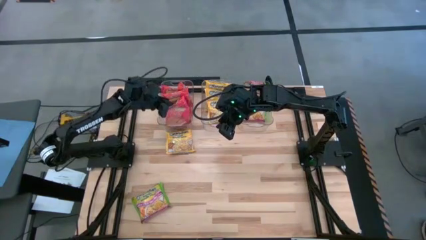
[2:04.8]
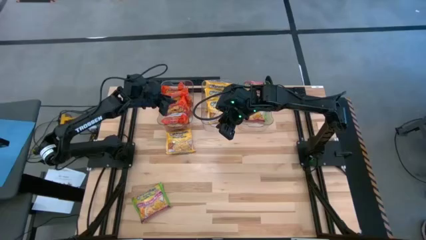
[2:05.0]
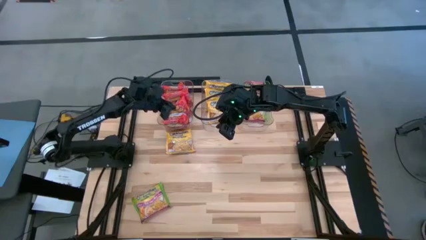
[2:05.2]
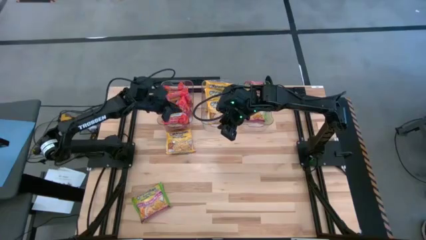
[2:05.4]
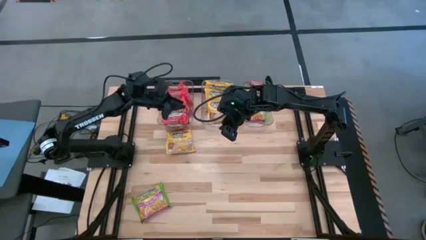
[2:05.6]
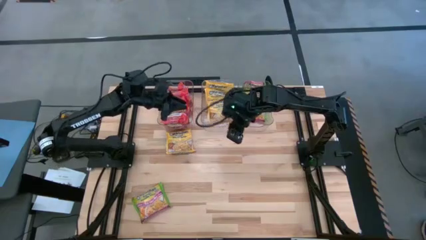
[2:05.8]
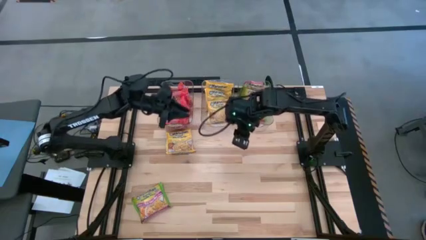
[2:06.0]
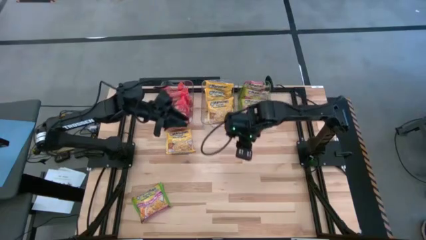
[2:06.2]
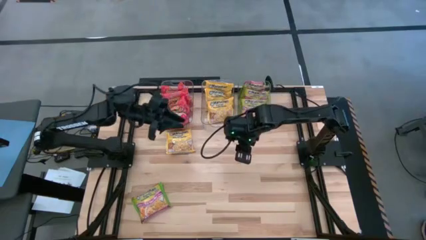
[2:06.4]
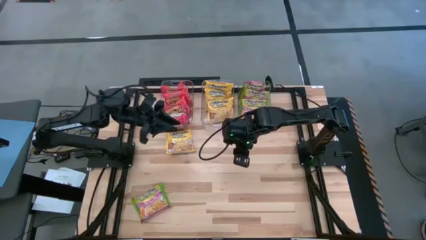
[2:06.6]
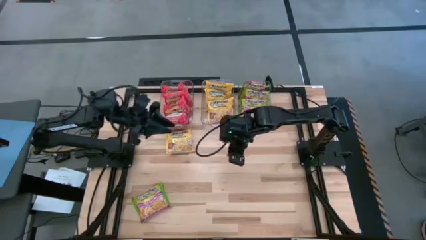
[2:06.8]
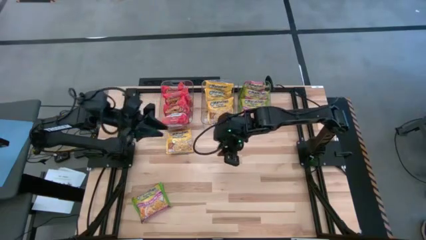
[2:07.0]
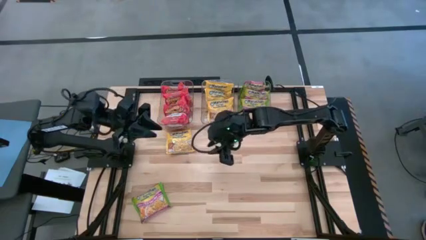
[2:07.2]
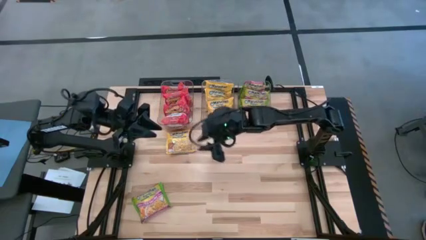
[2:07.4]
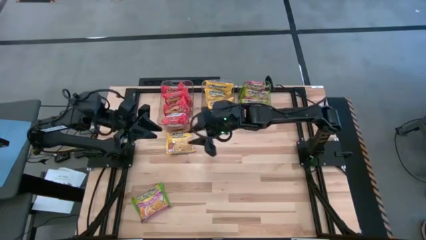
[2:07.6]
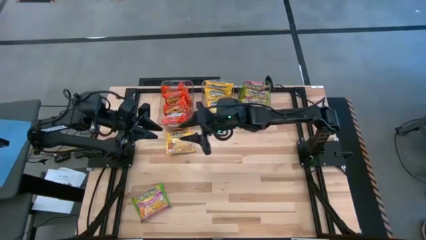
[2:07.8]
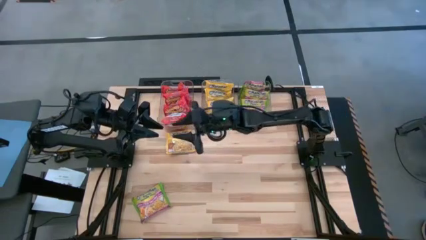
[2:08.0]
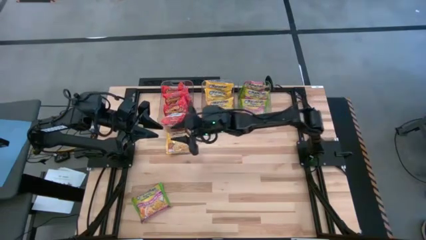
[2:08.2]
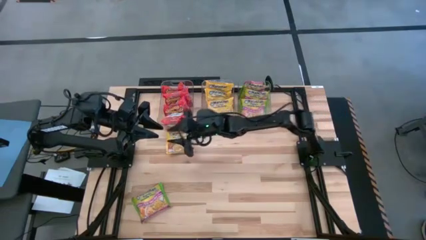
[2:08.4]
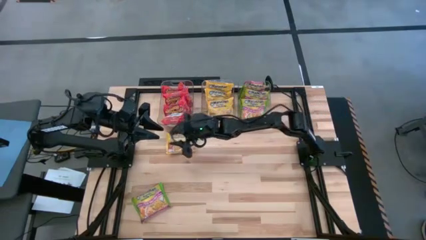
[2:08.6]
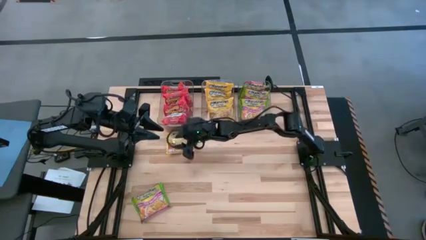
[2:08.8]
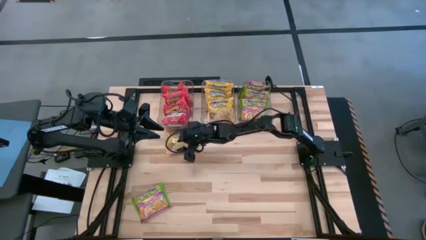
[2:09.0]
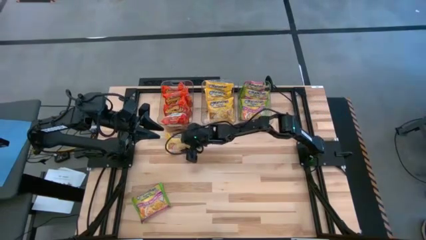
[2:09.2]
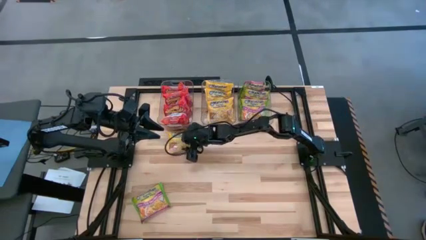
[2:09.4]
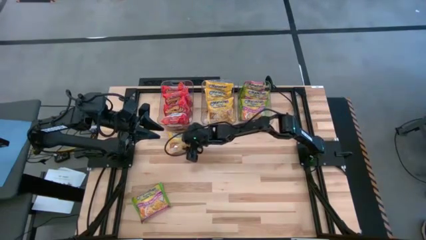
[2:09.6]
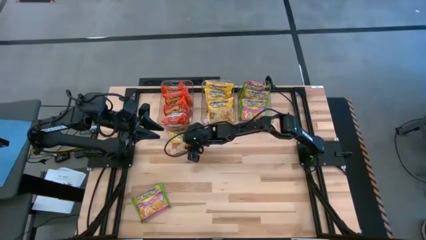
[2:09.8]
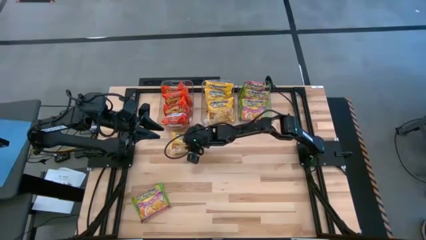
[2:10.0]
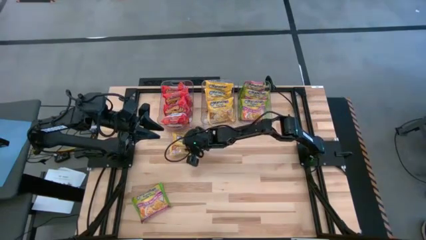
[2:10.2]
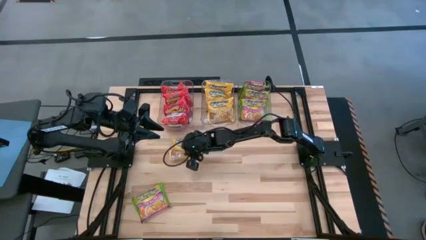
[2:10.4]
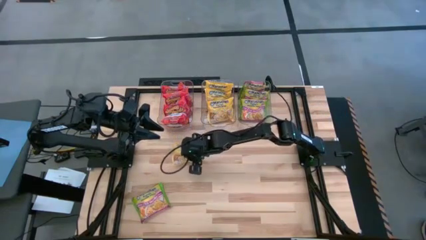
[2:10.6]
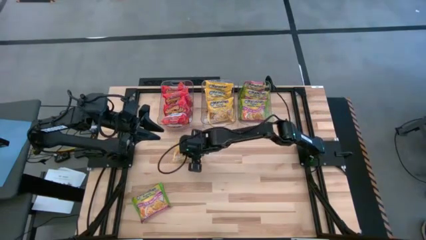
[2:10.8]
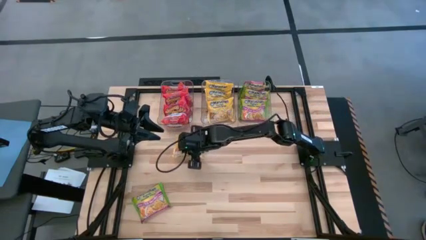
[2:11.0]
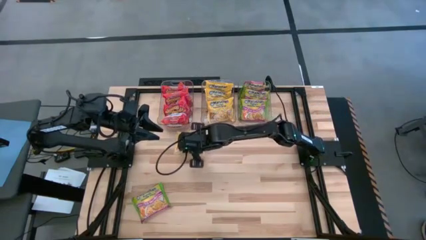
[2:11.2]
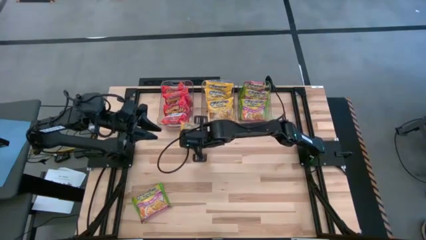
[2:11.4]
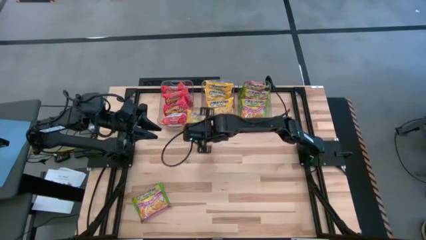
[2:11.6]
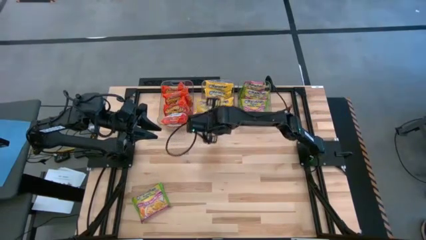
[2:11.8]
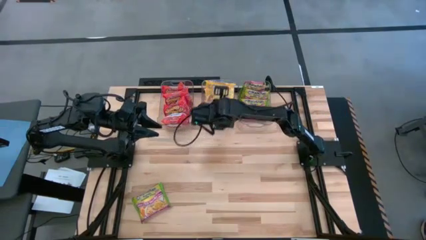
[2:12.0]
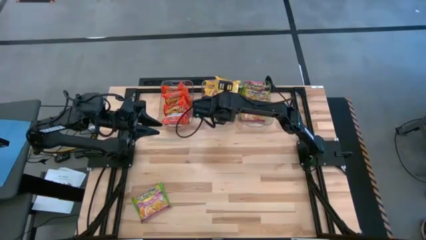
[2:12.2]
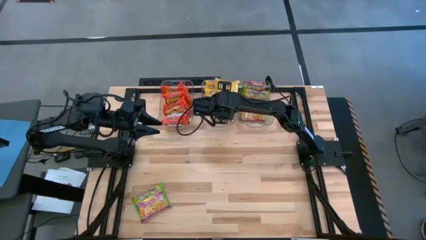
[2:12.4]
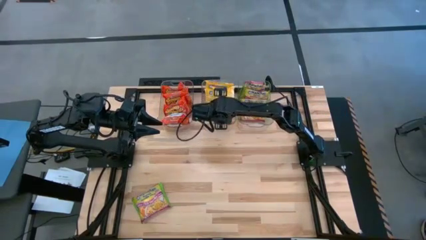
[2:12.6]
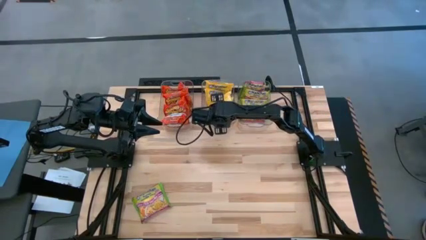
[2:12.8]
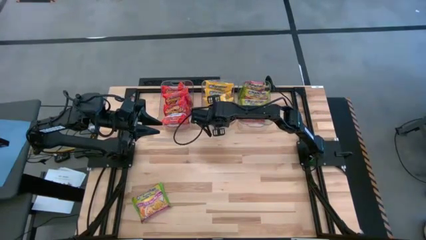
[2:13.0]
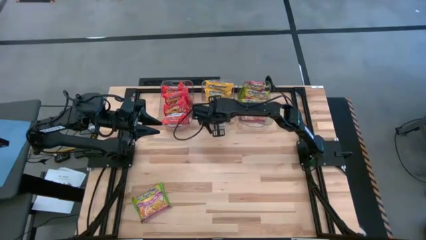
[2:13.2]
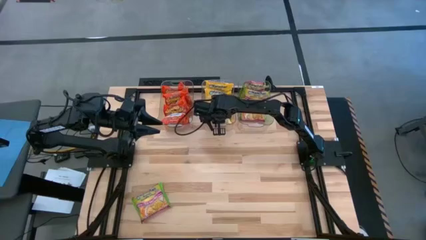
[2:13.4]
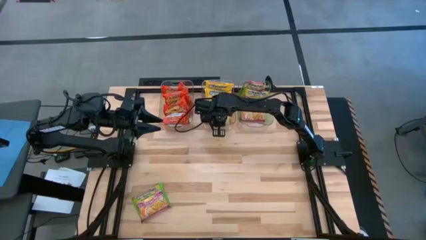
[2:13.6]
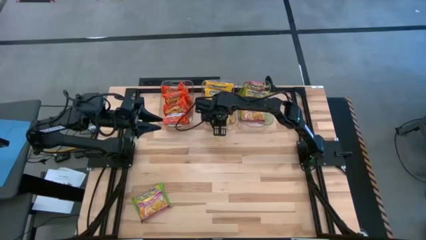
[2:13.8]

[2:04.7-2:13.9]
Task: Sort Maruchan noodles
Put the yellow noodle pack into the middle transparent bin

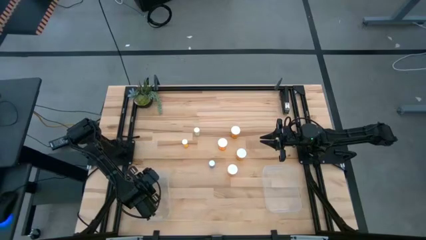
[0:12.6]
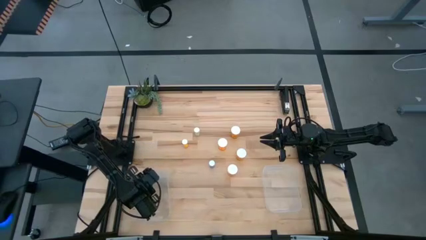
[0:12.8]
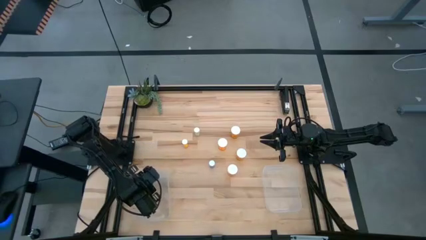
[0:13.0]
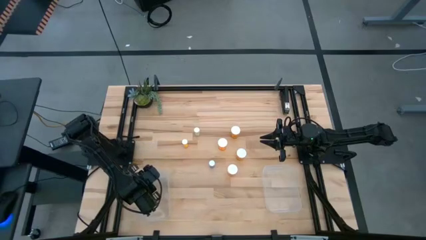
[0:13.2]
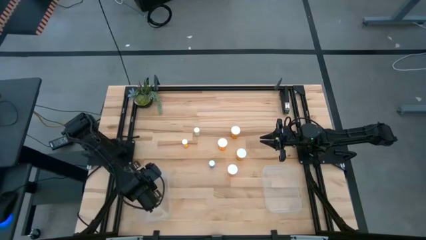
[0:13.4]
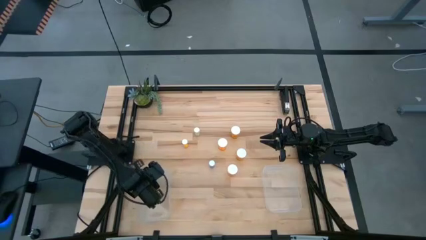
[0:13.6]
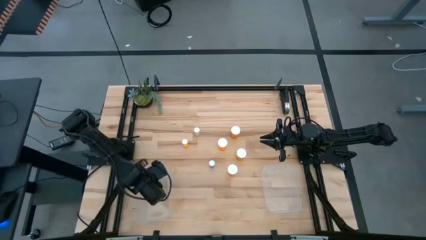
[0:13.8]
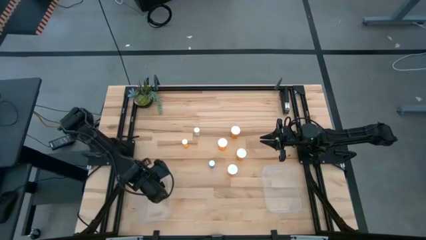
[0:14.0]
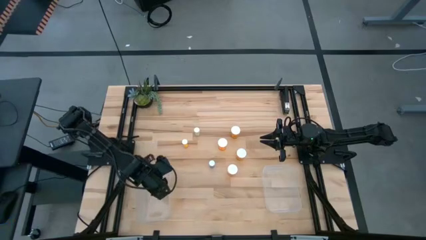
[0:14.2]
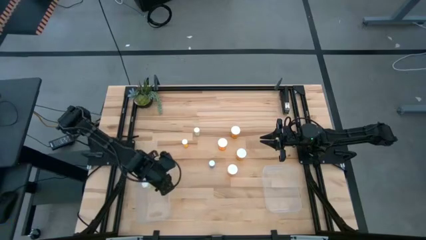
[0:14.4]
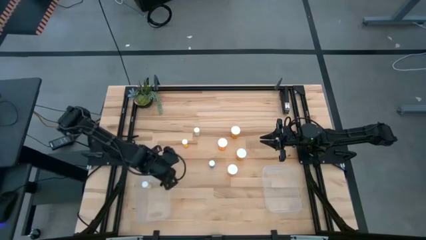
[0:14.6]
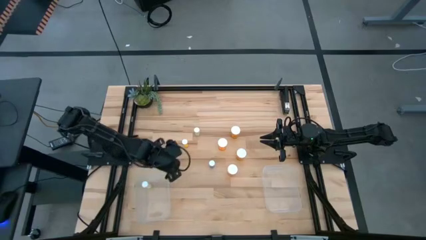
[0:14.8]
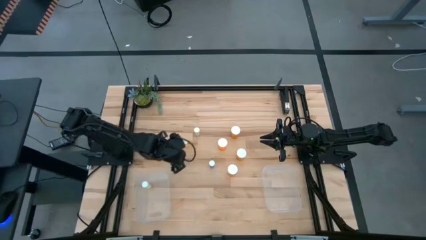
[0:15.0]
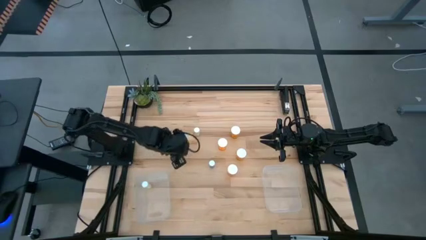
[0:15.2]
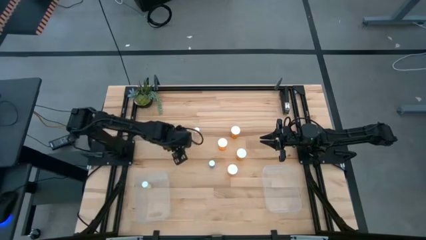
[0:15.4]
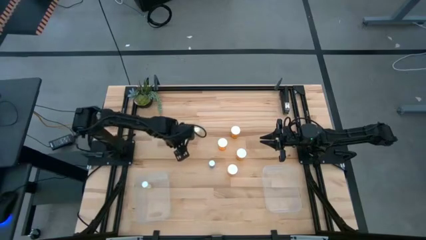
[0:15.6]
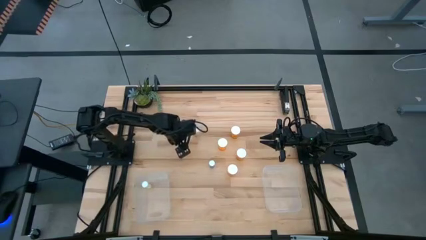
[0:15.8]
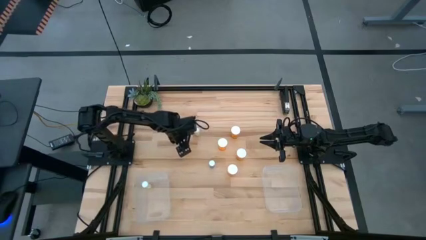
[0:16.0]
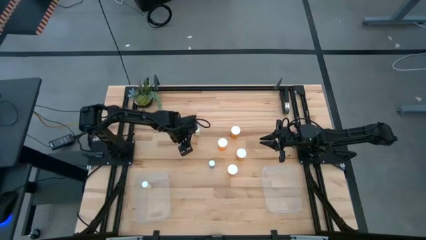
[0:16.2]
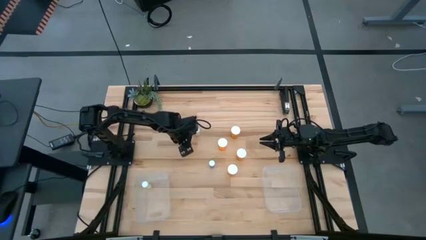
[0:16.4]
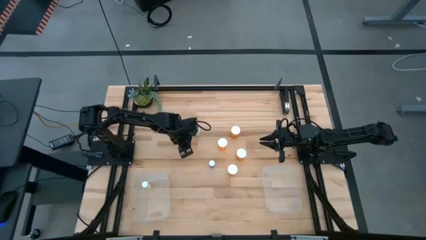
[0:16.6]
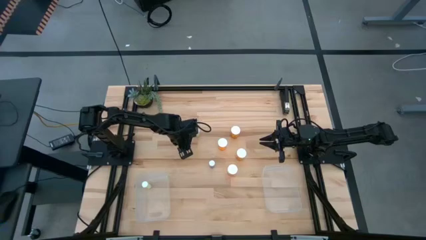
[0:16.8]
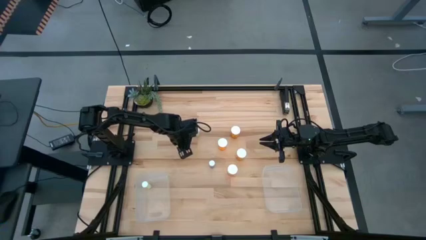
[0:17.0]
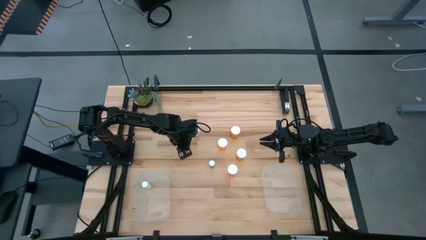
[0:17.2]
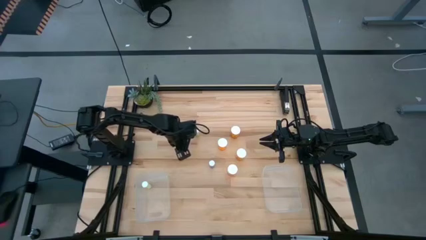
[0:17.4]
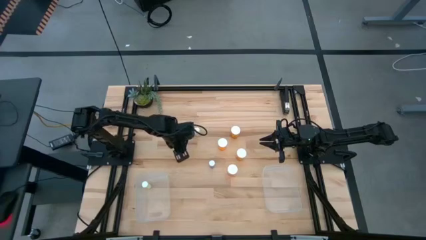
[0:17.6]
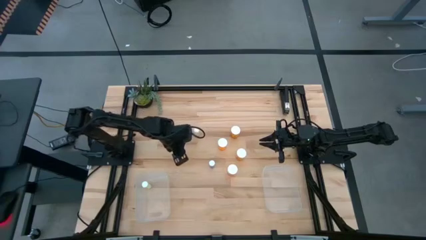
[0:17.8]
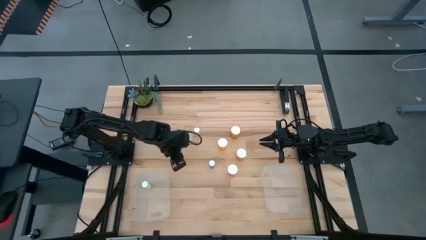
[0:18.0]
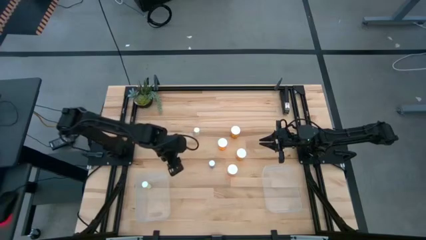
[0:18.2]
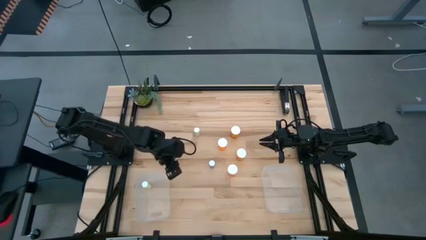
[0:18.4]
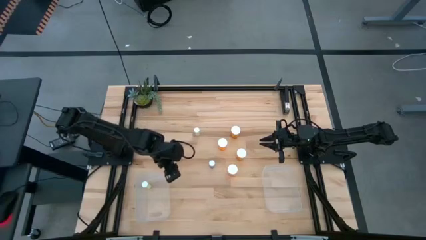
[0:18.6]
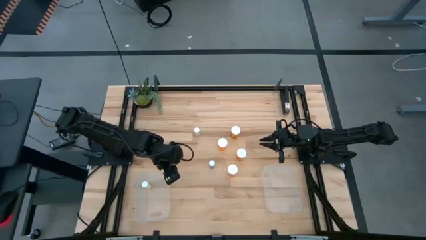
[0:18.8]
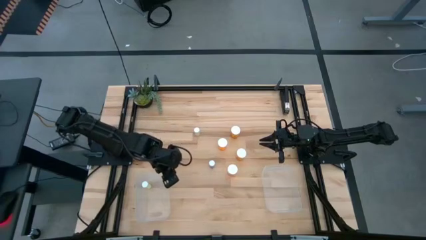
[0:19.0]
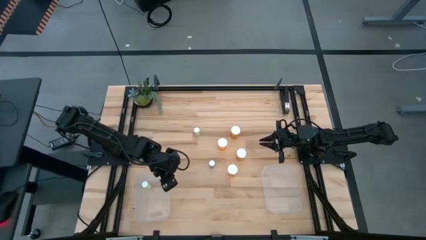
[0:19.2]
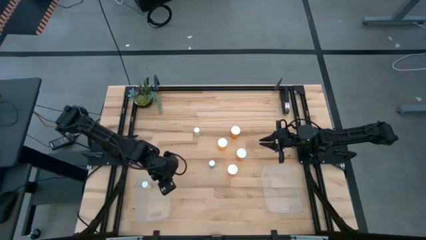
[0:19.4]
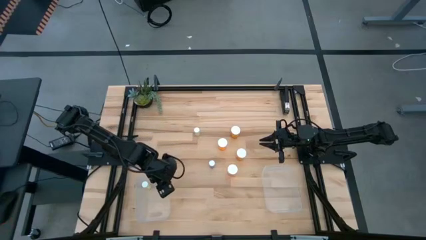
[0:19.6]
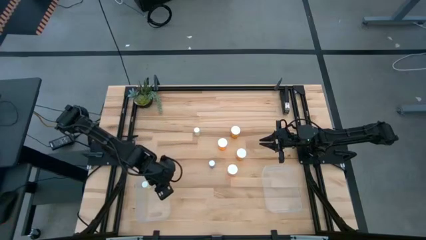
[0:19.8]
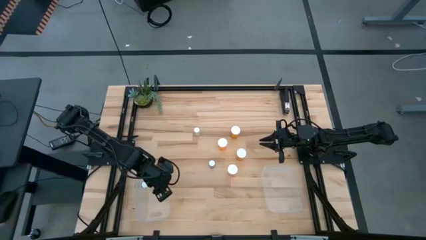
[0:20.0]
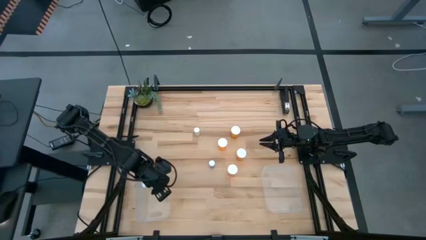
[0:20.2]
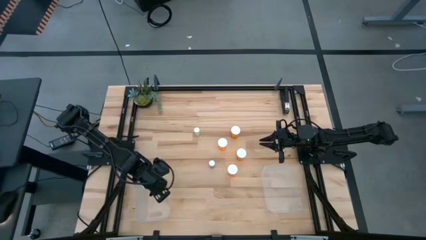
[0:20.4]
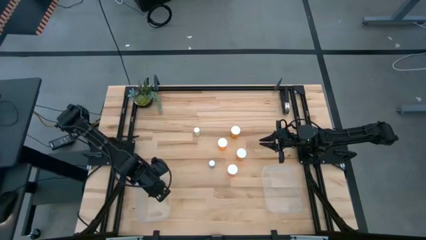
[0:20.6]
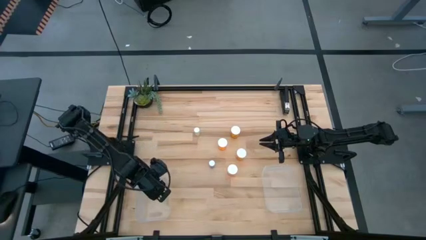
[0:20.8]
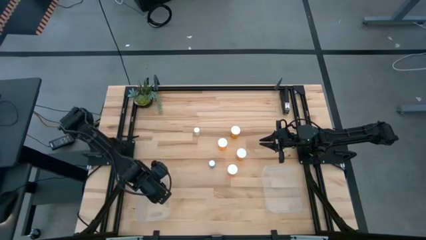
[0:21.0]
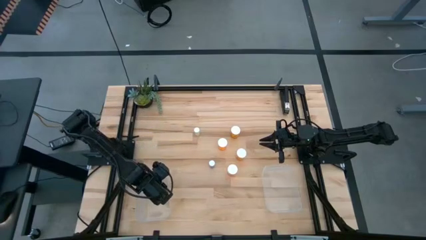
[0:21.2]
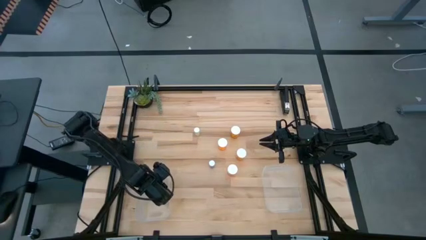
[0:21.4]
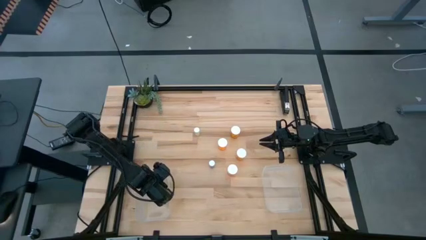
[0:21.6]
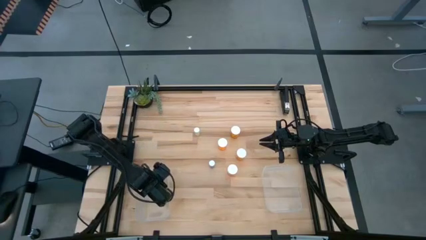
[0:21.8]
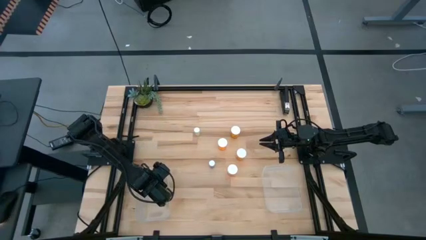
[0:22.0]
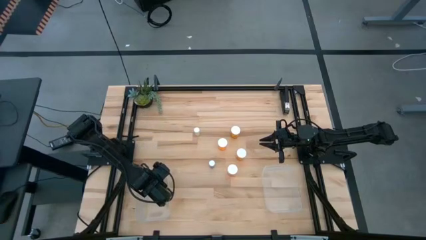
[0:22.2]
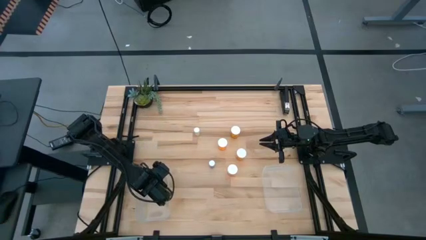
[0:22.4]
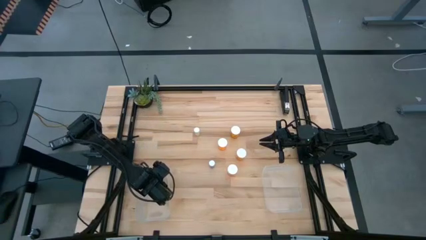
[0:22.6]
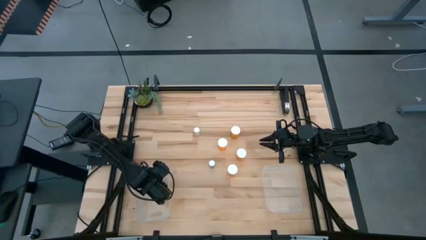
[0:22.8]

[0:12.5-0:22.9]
Task: Pick and place medicine bottles into bin by pill shape (circle, oval)
Put the small orange pill bottle into the left transparent bin
